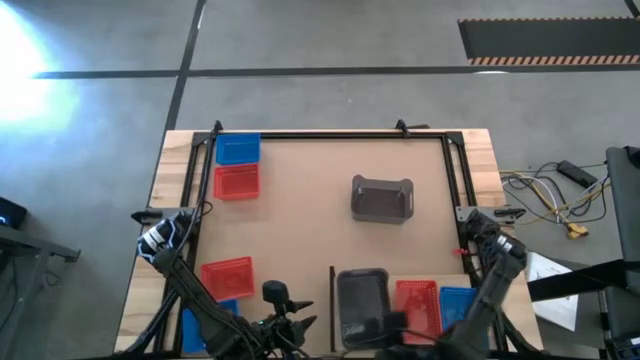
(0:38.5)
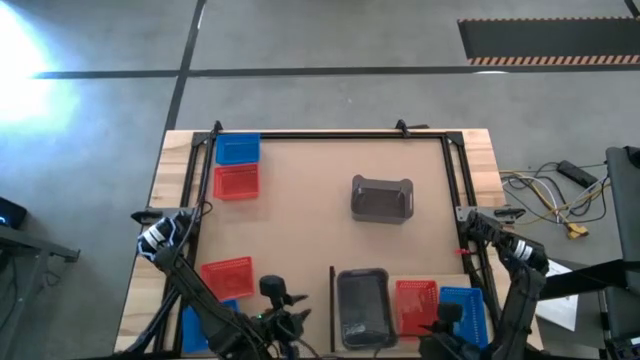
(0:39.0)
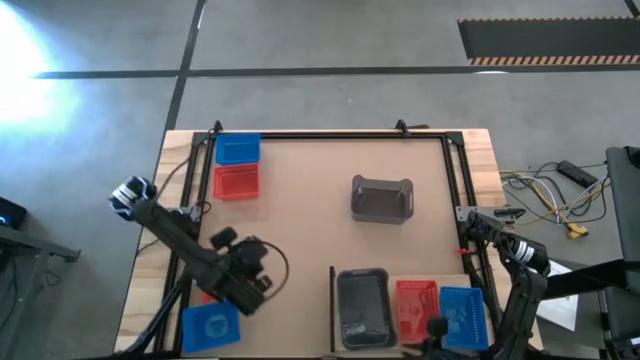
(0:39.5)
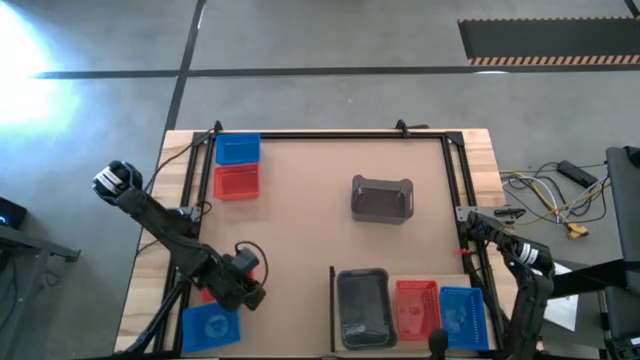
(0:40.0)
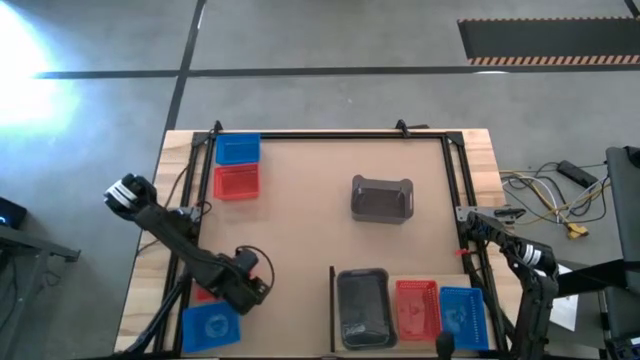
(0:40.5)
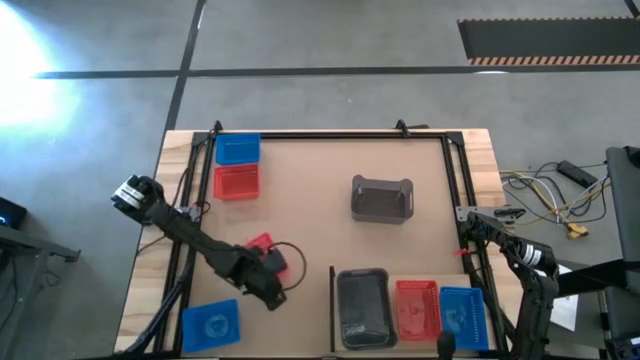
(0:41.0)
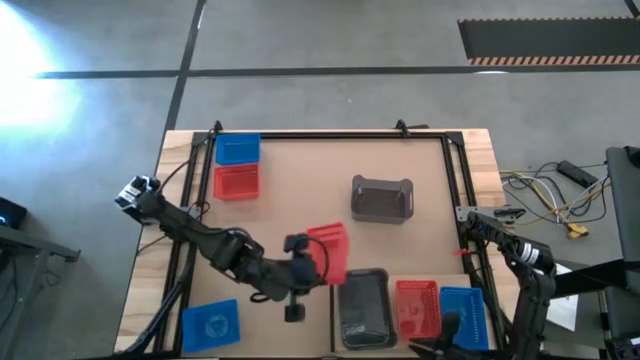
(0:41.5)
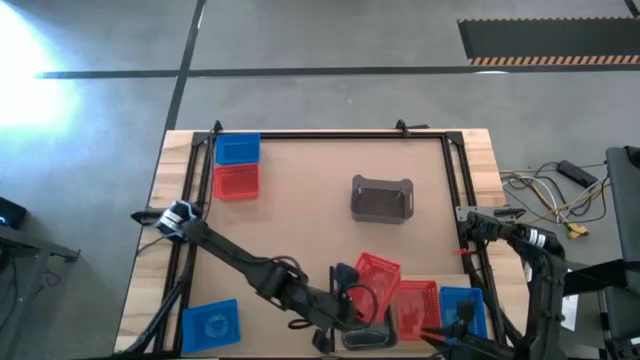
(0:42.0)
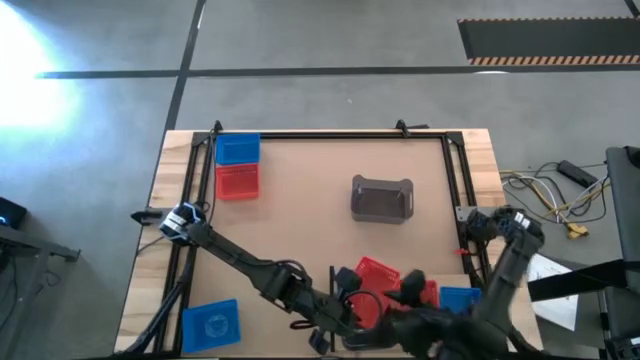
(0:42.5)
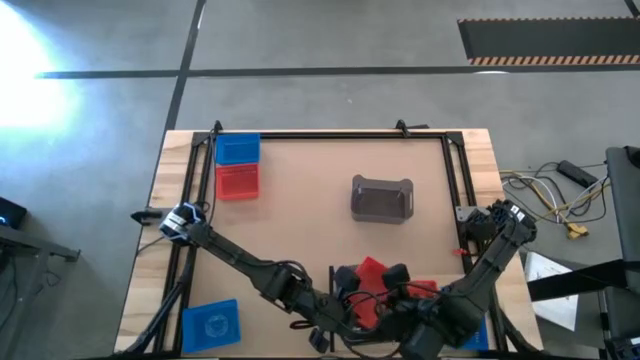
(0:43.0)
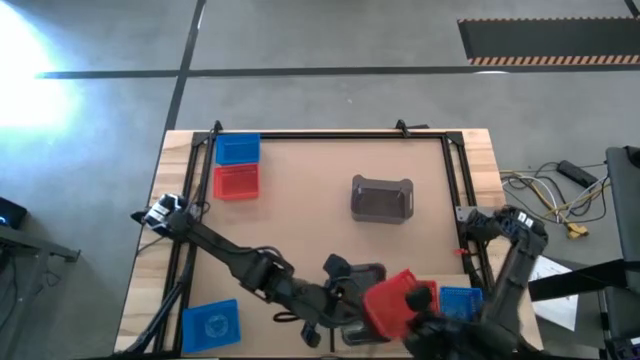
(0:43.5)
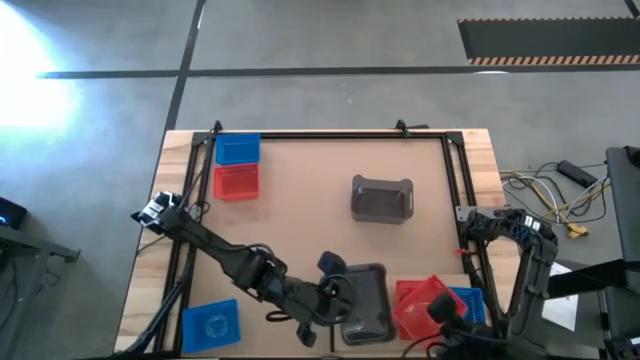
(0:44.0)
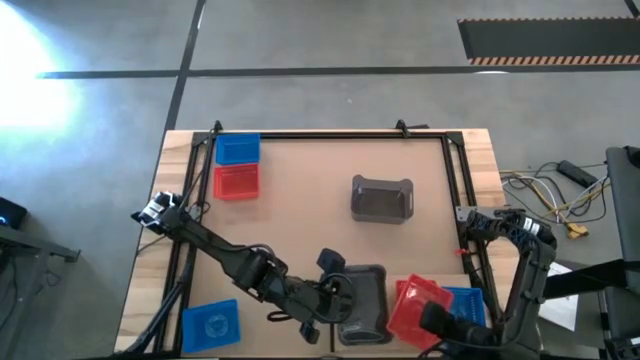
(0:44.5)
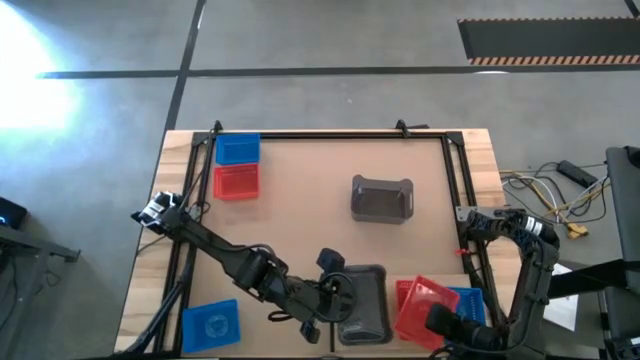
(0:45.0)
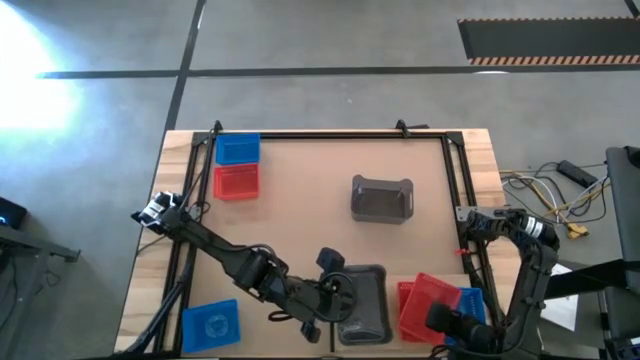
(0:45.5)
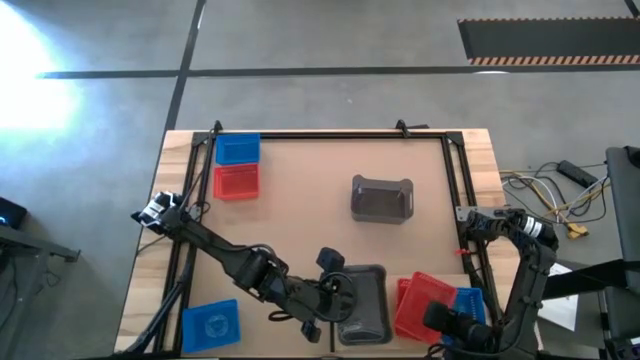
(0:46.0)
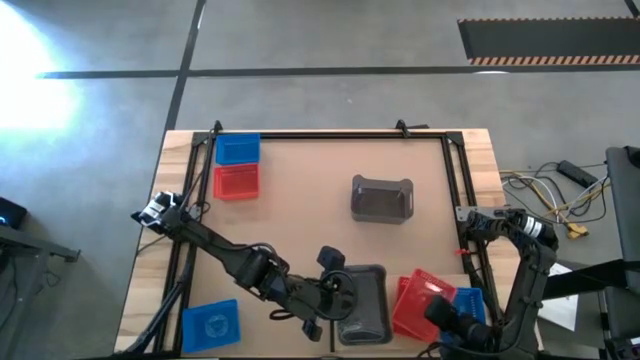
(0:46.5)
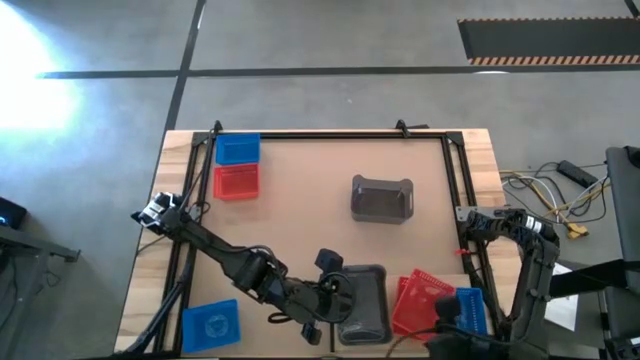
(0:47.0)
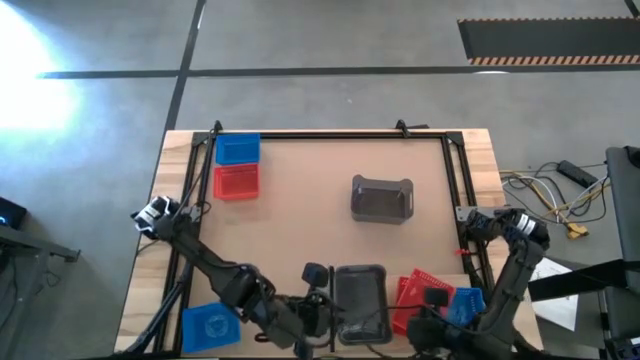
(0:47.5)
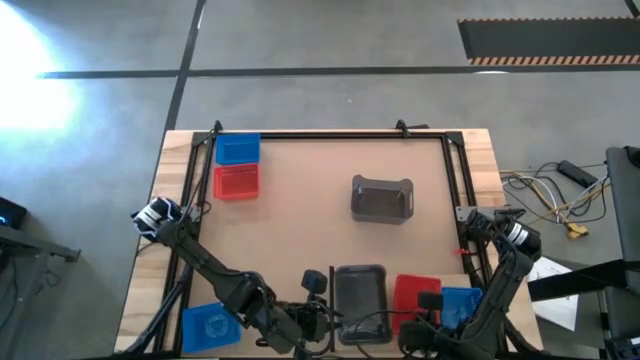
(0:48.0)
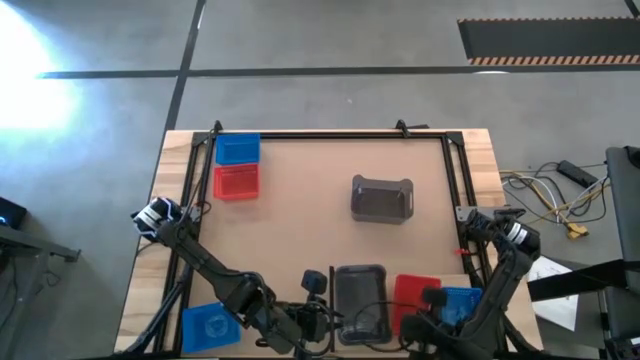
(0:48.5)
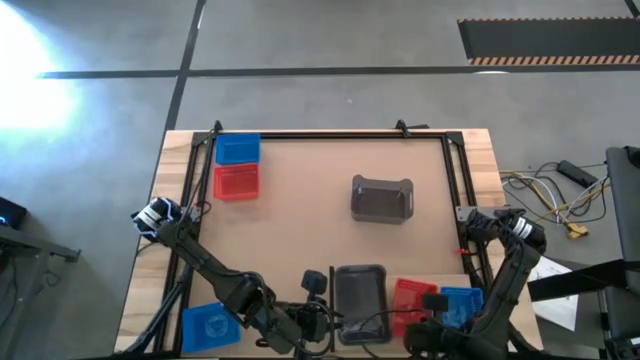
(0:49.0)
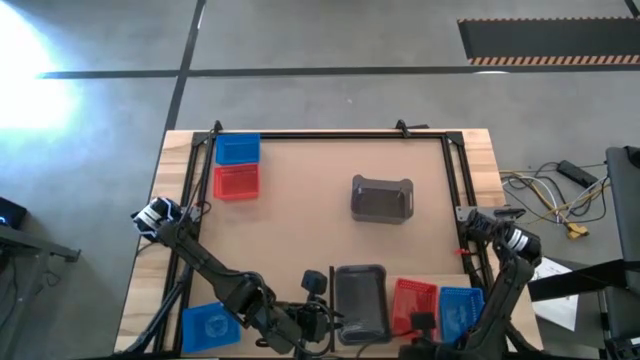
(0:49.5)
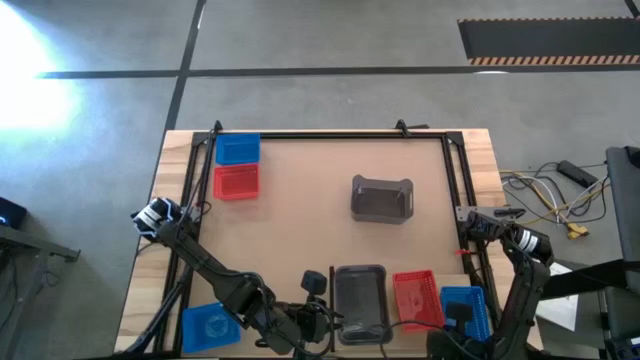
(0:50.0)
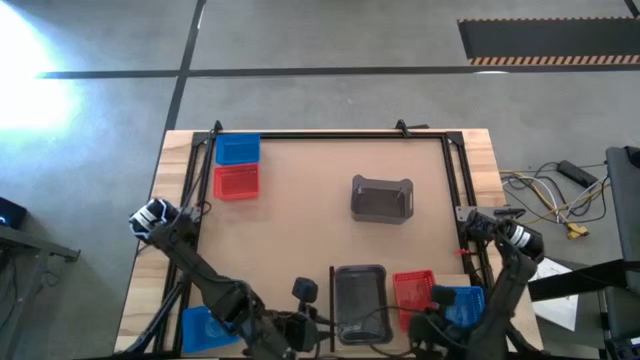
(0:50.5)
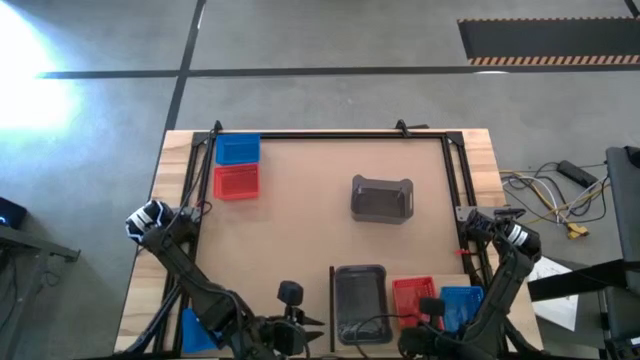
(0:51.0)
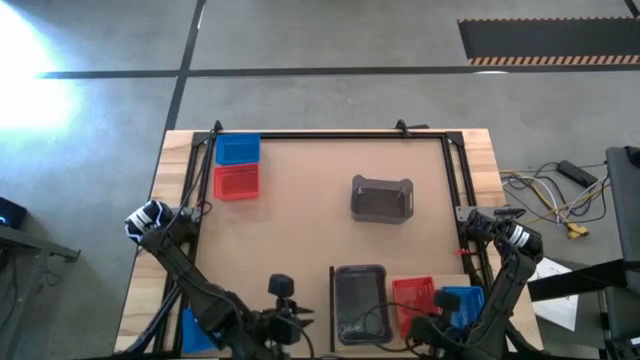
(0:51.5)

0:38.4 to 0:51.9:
Task: Stack baskets on shelf by color
Stack the bottom red bin on top of the red bin on the shelf

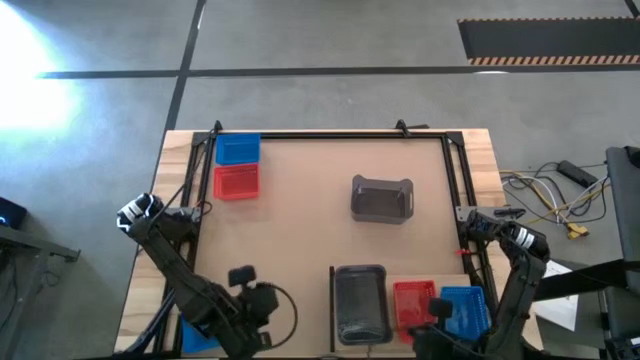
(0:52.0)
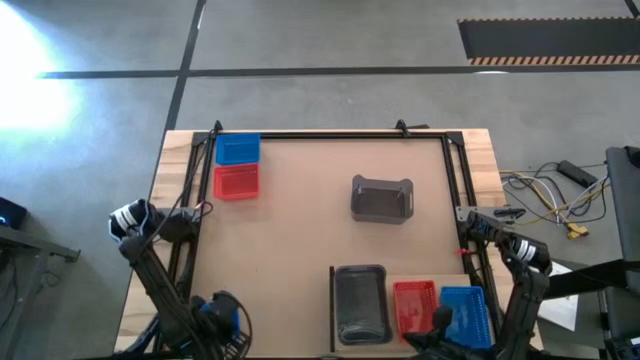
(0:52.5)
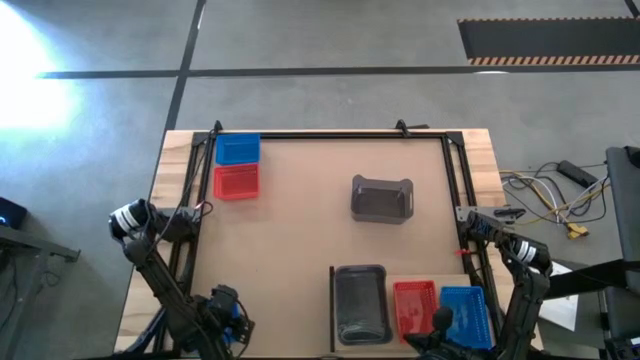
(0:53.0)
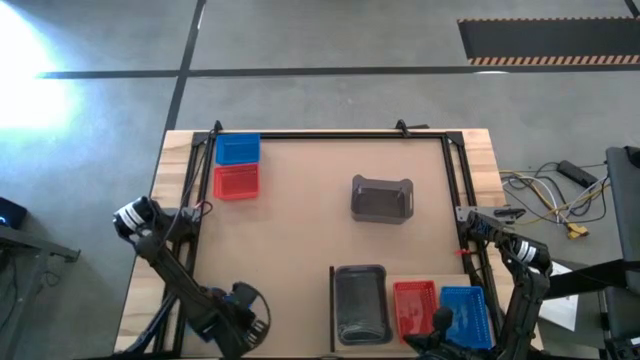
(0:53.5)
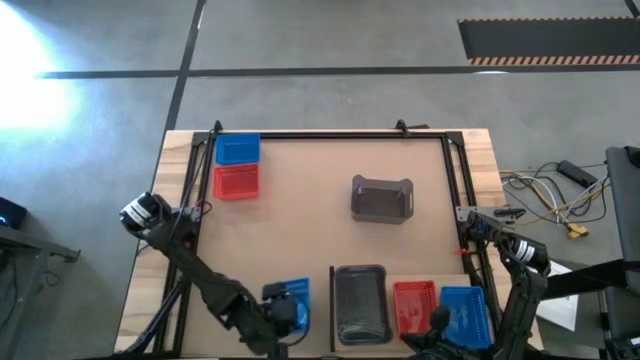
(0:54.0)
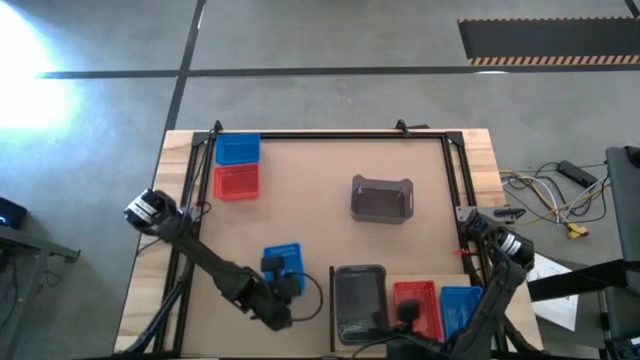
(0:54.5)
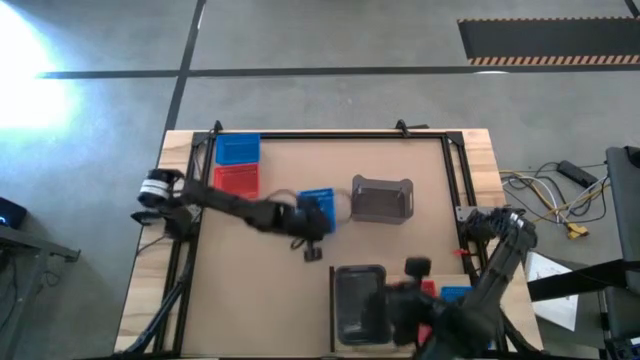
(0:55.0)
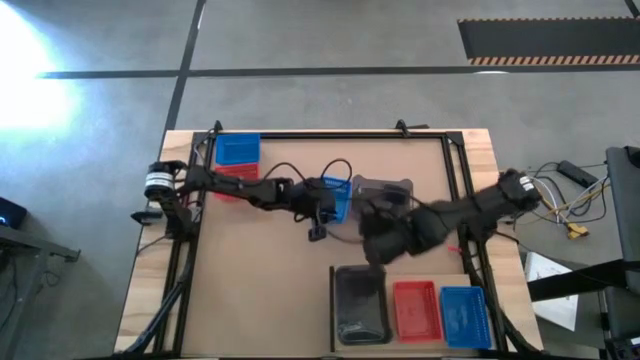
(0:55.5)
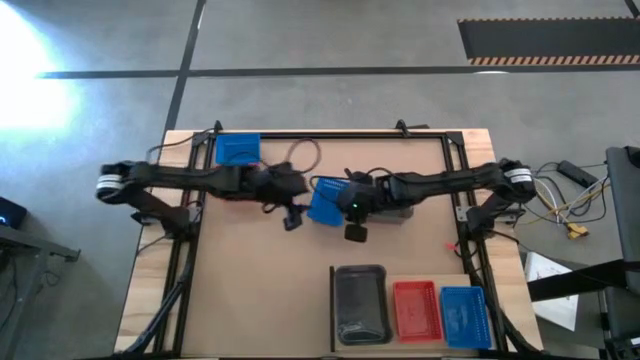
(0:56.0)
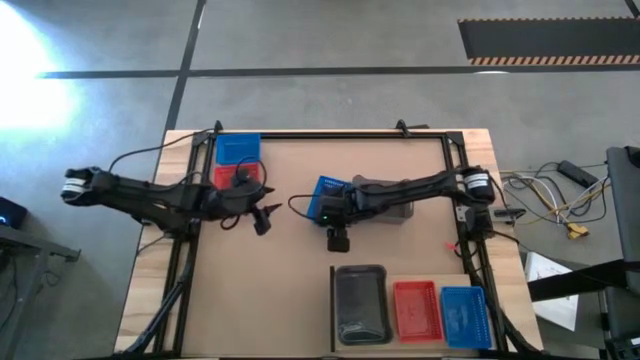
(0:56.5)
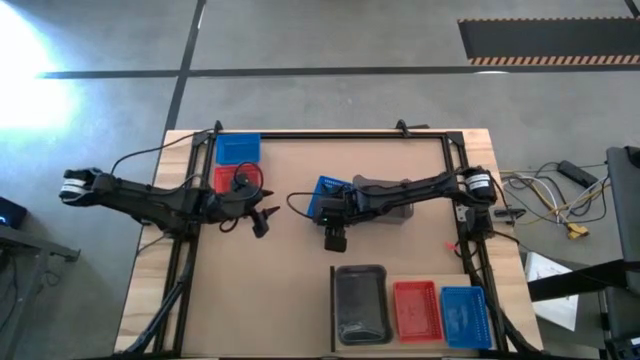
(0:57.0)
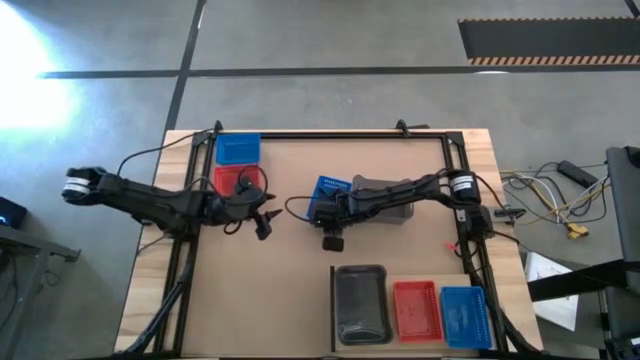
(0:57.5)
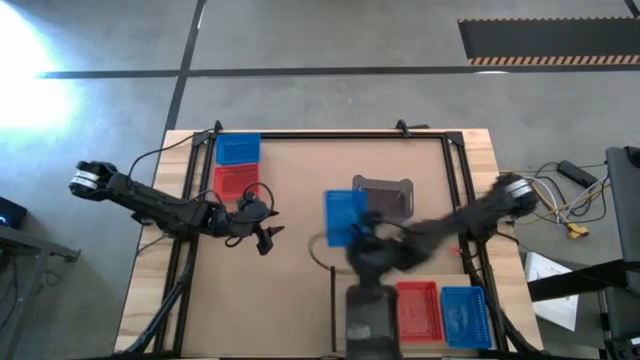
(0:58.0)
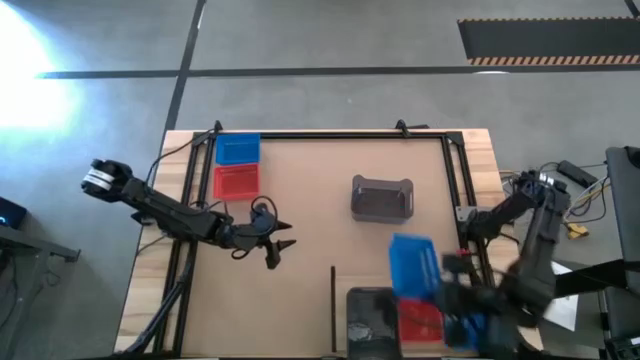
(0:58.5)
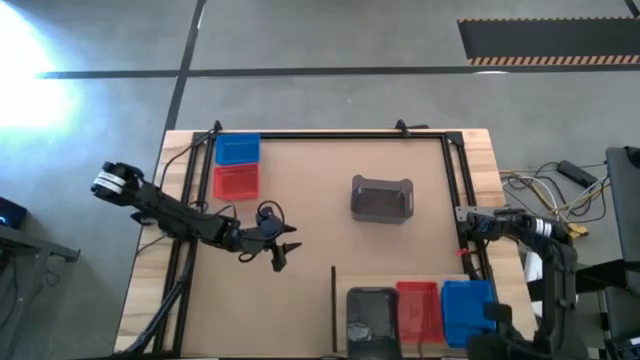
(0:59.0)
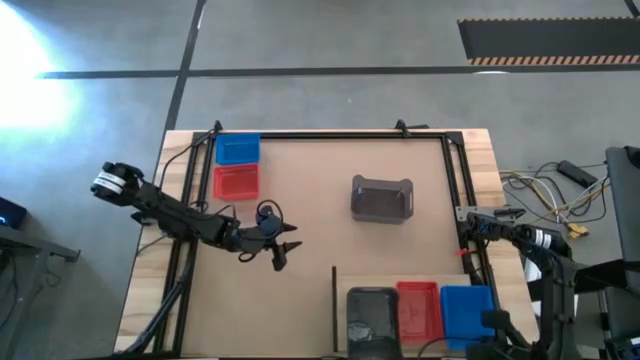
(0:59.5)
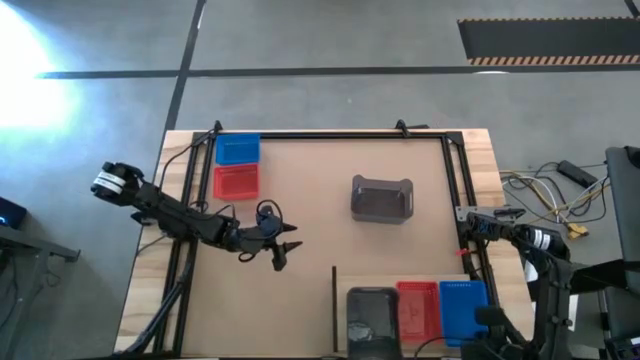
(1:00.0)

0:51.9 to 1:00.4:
Stack the bottom blue bin on top of the blue bin on the shelf
